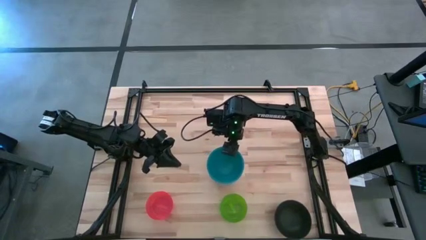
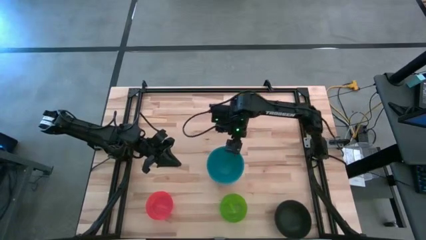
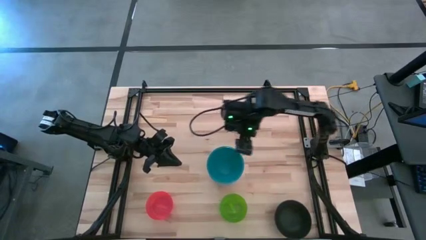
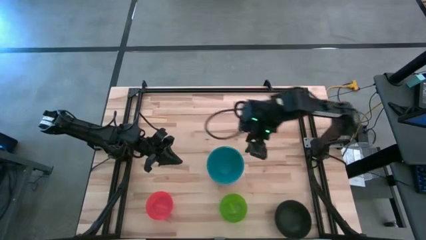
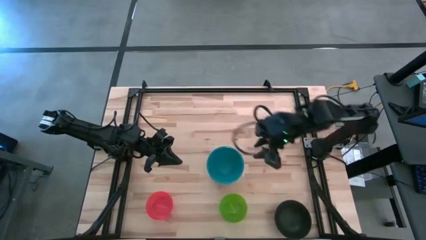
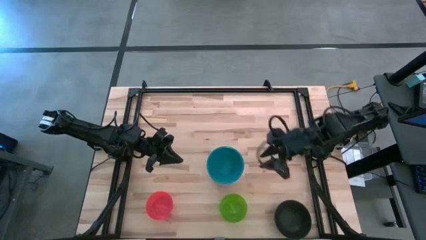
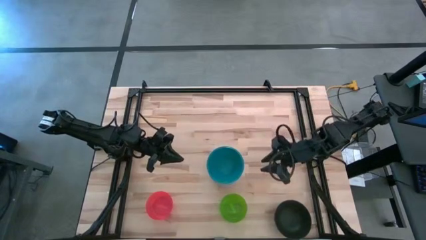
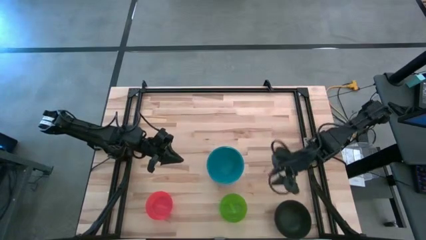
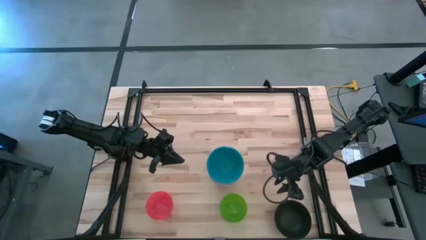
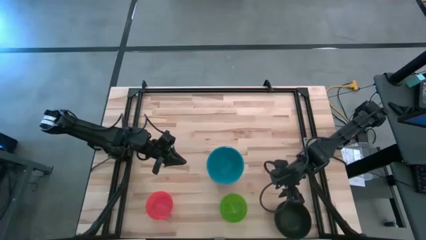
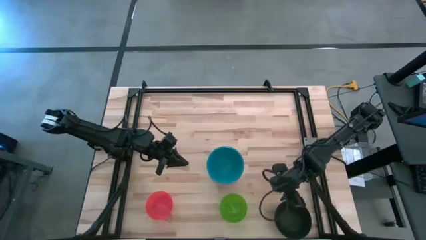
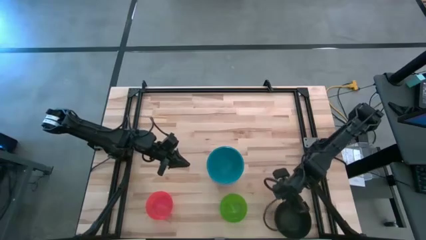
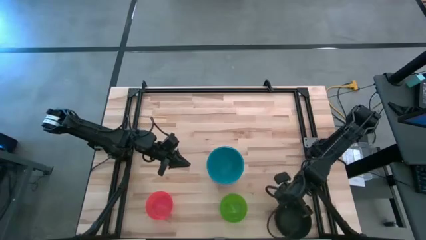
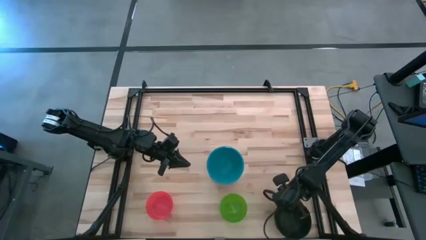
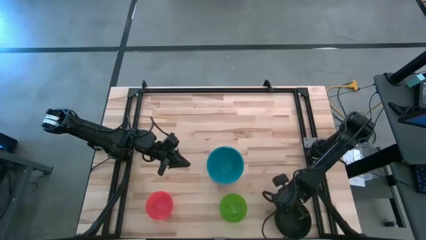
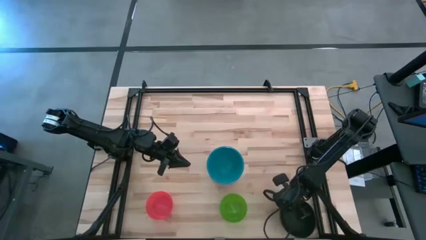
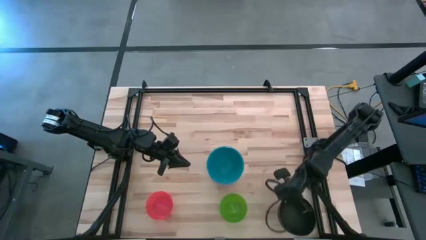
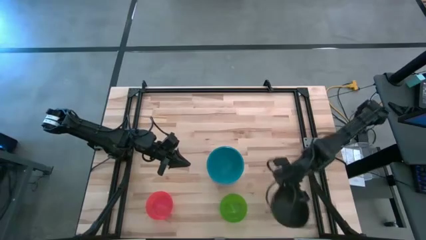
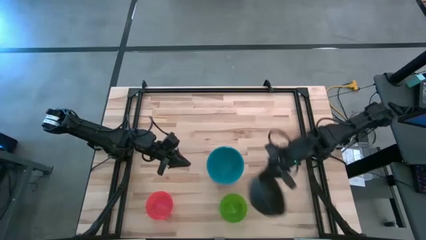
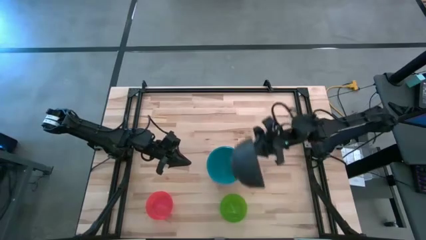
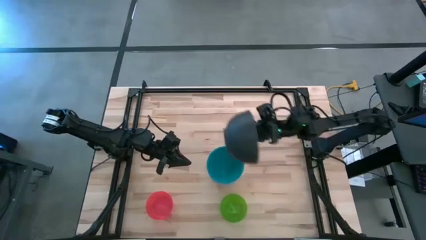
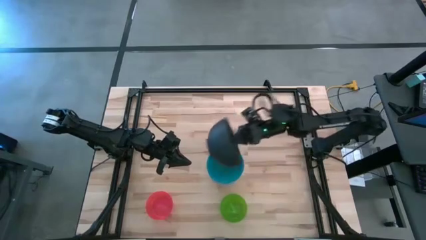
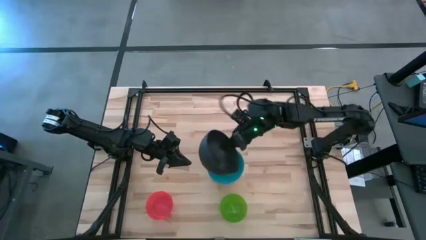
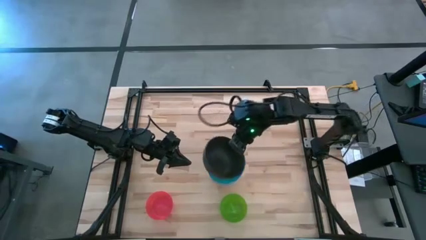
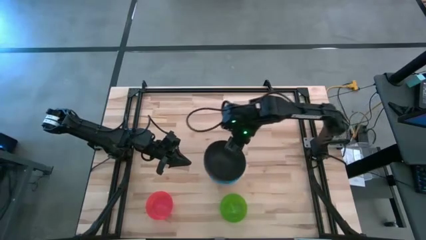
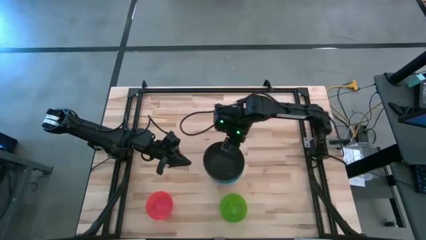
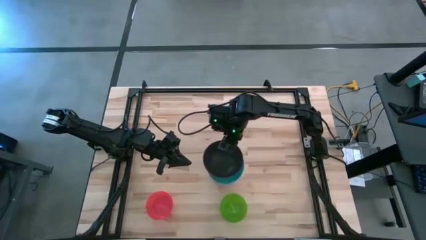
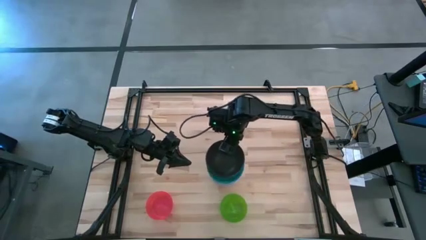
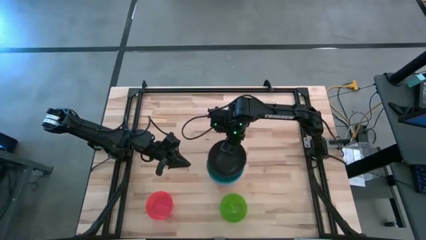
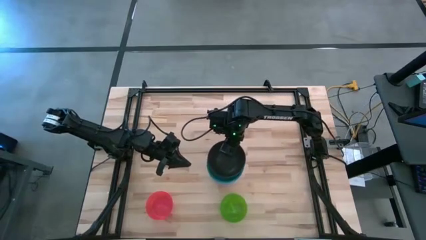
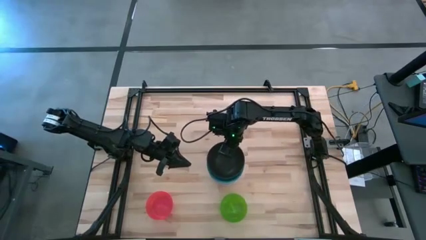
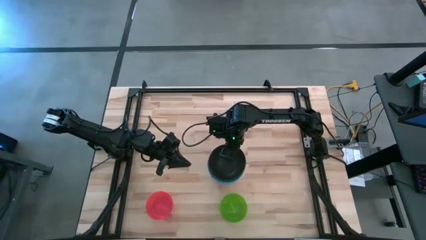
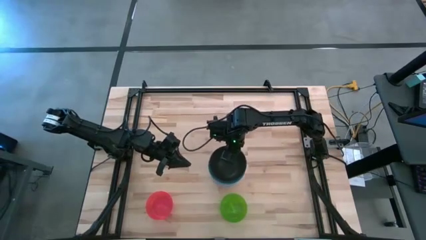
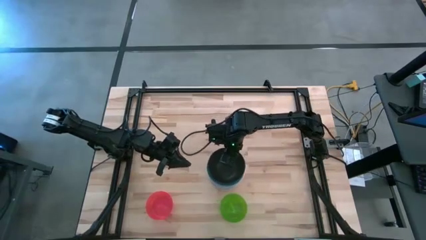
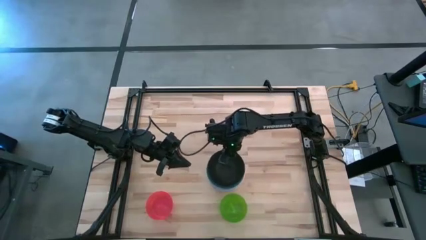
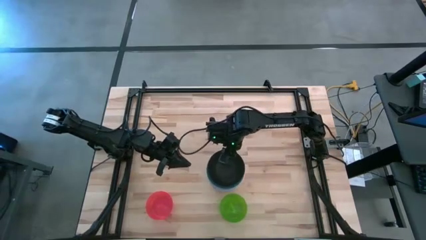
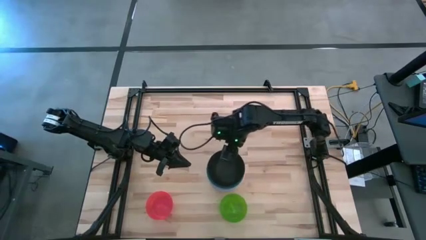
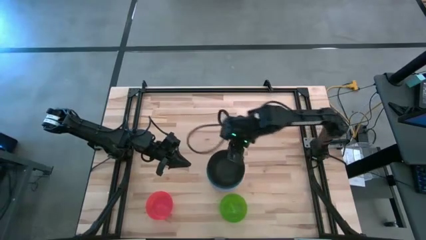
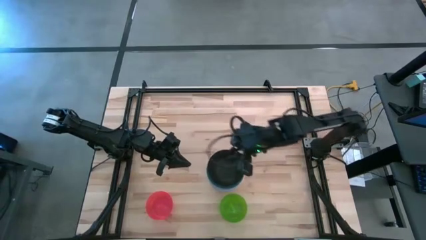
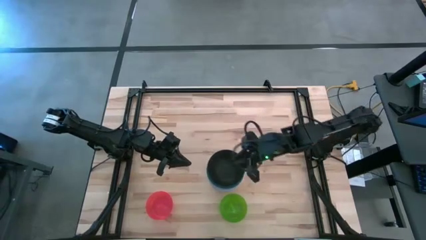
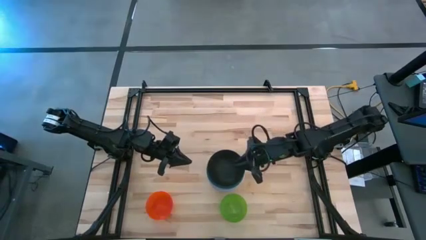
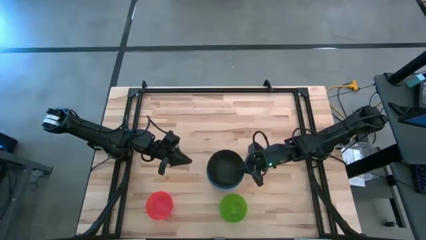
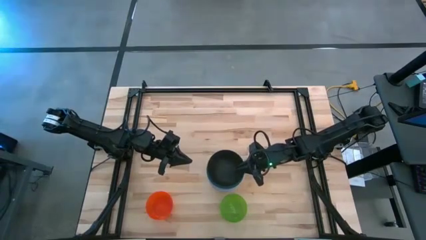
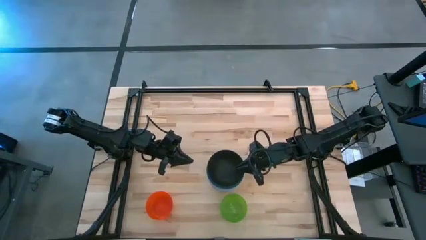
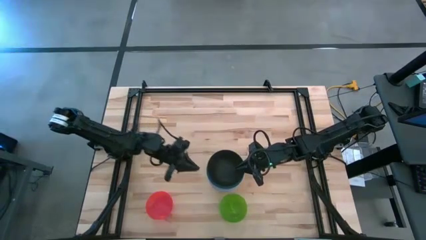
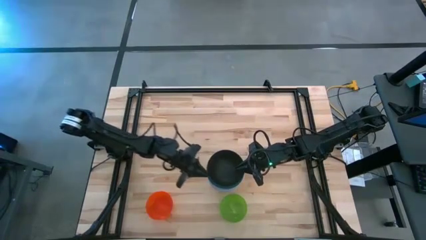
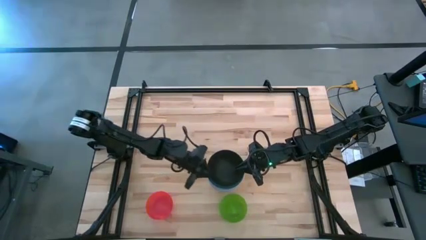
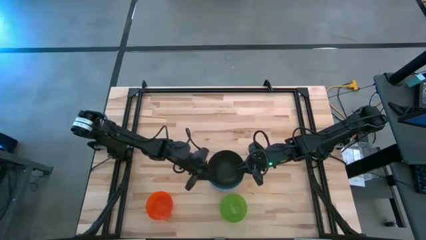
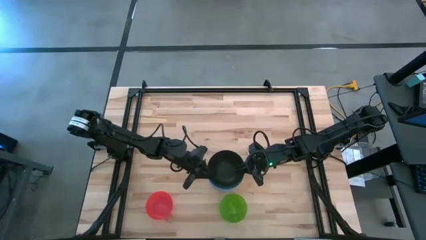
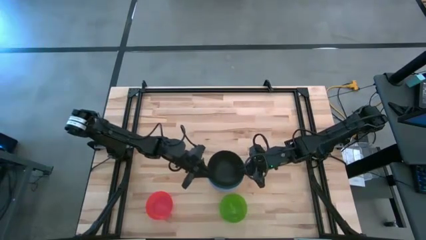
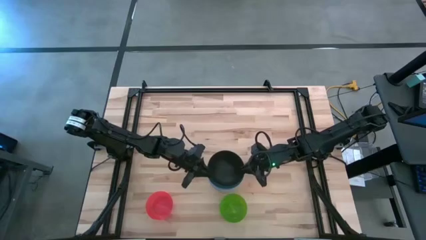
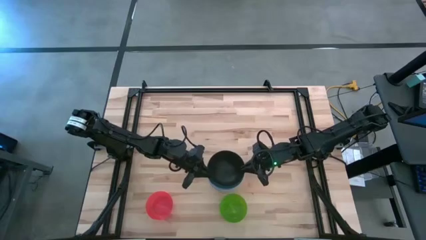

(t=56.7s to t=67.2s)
Task: Nest bowls inside each other
Stack the black bowl on top of the blue bowl

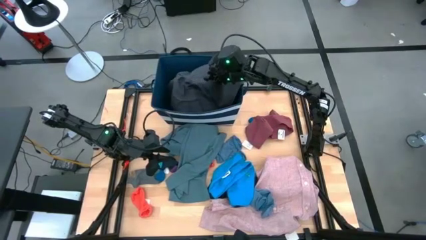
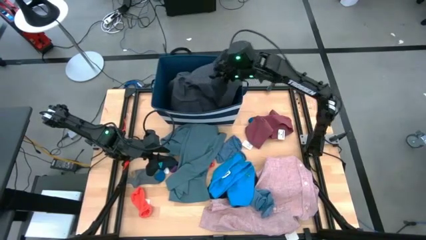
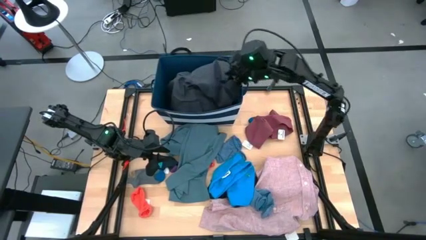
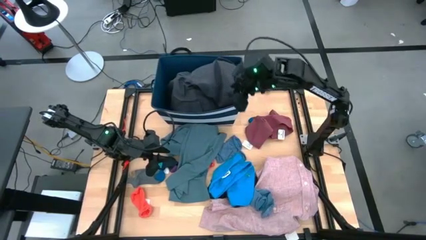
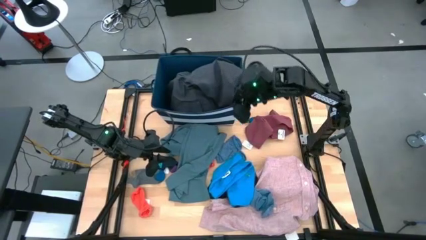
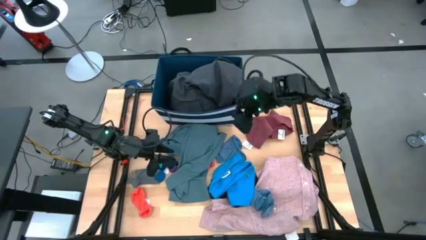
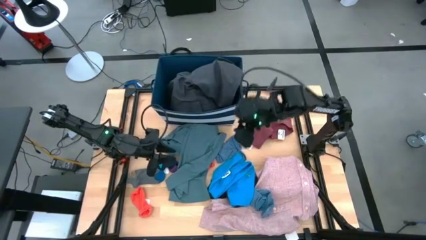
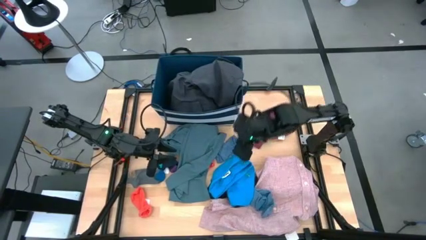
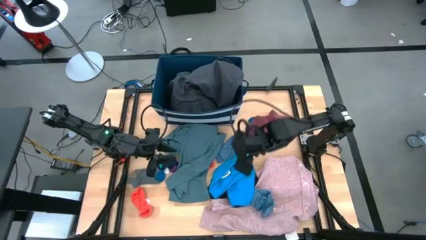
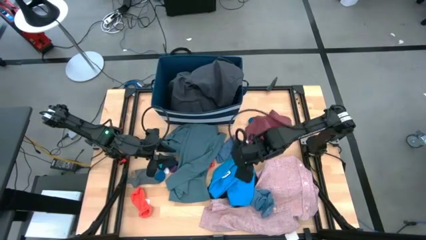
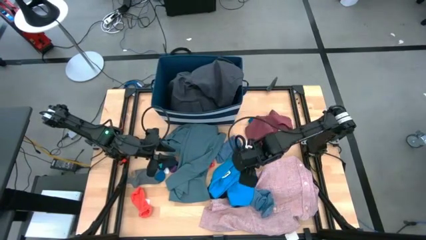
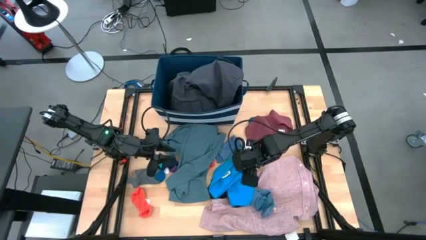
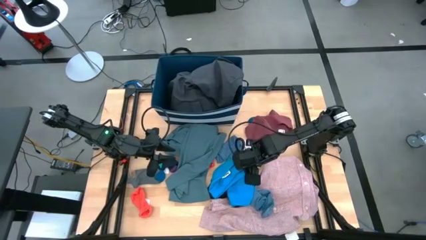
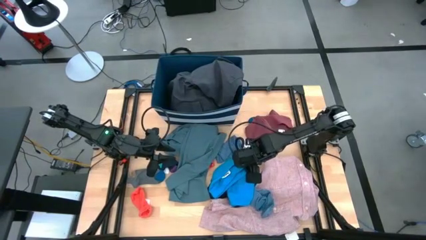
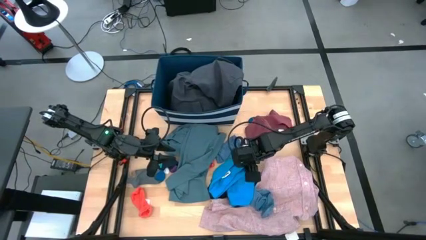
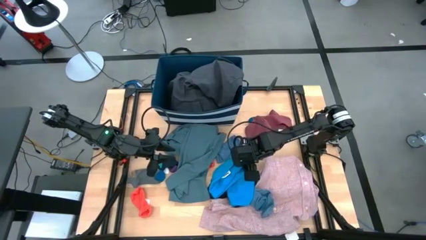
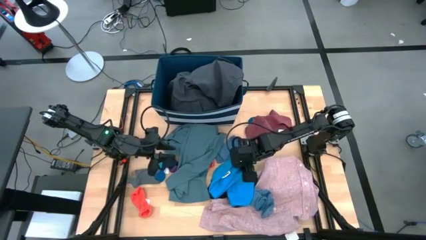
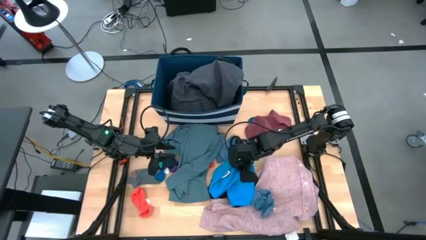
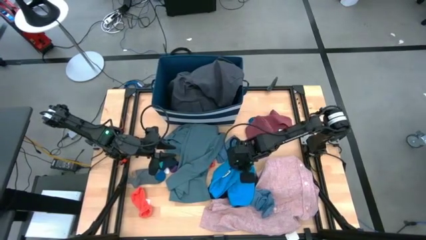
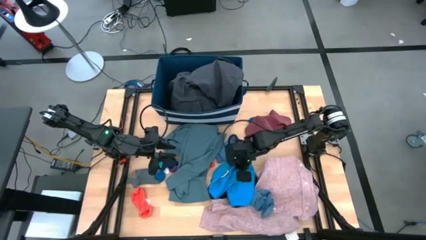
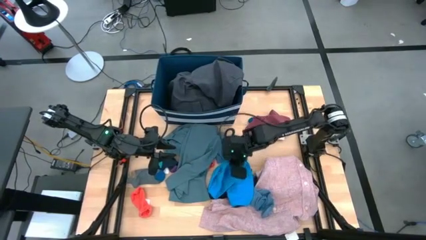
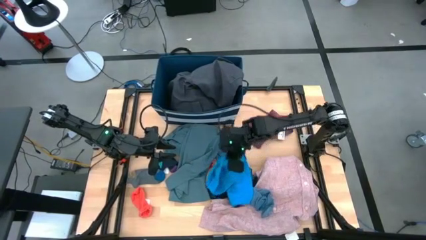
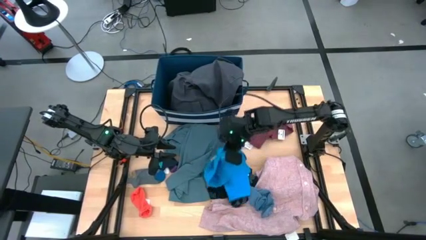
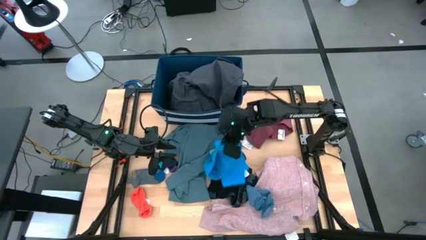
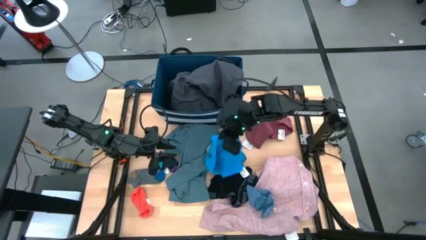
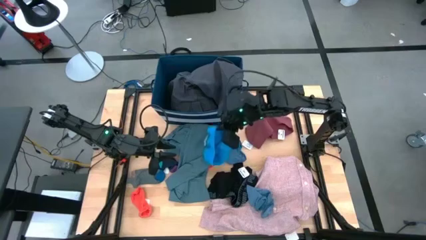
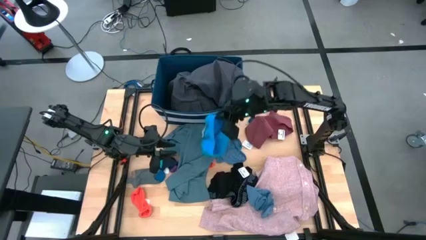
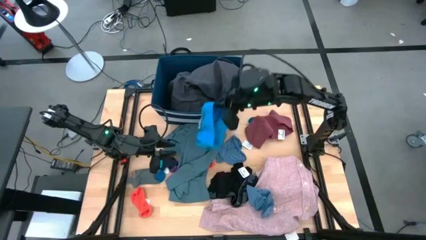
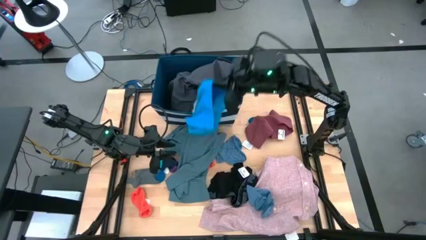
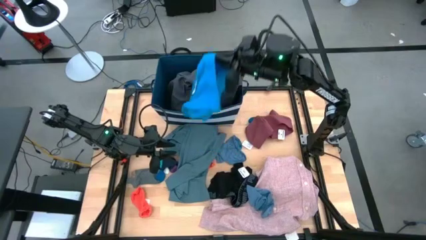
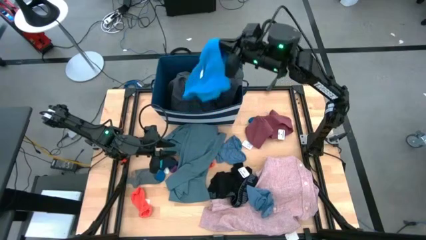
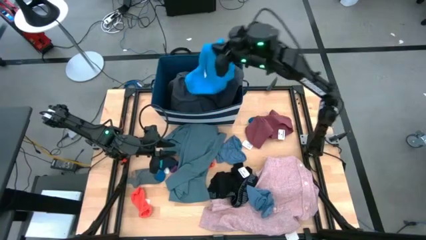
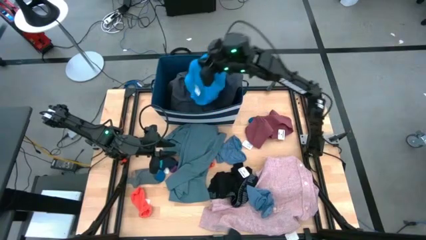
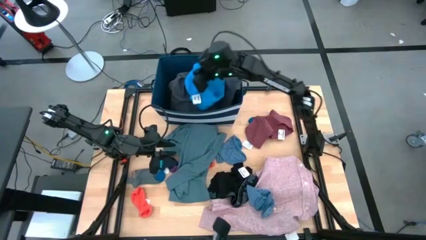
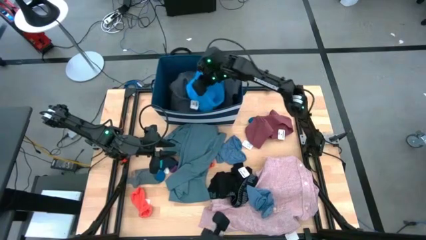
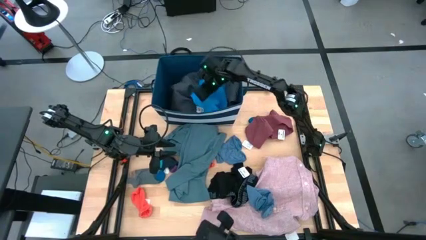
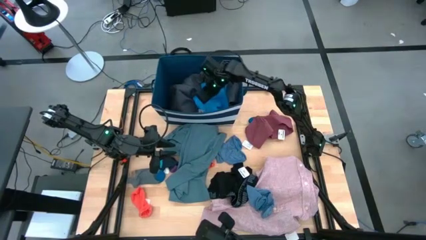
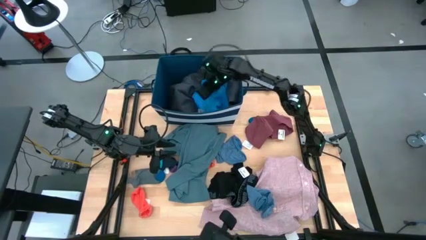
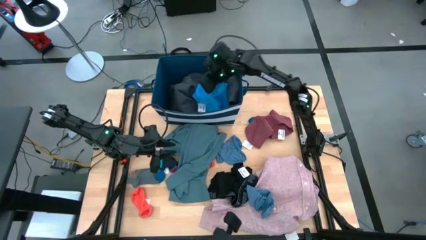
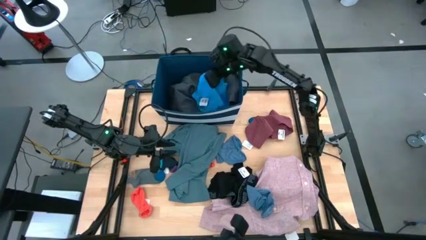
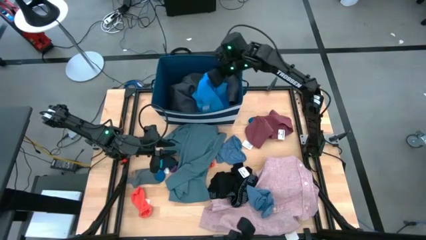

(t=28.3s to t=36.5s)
Task: Sort clothes
Put the blue underwear into the blue bin
